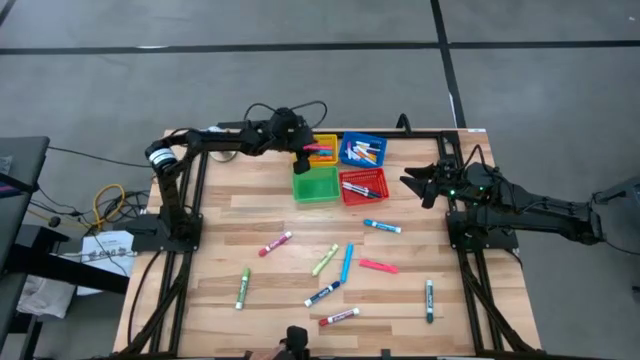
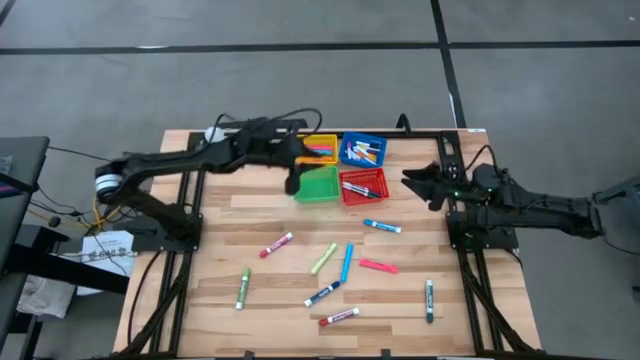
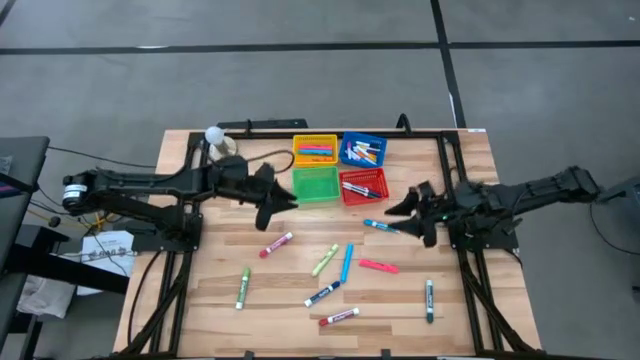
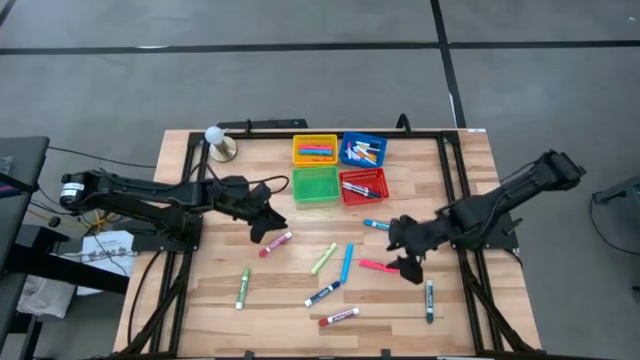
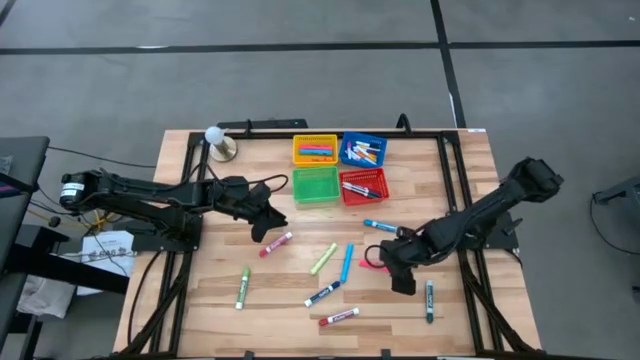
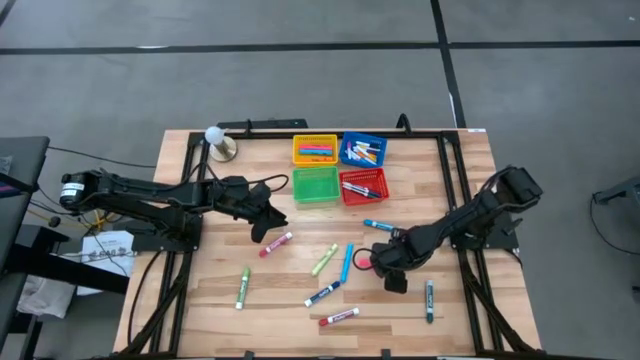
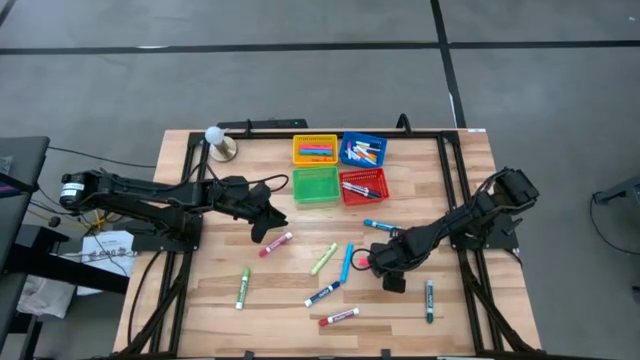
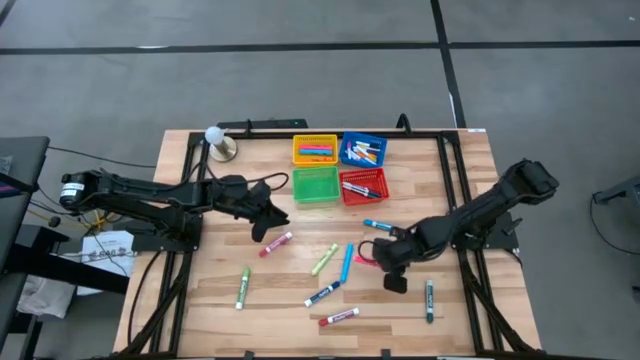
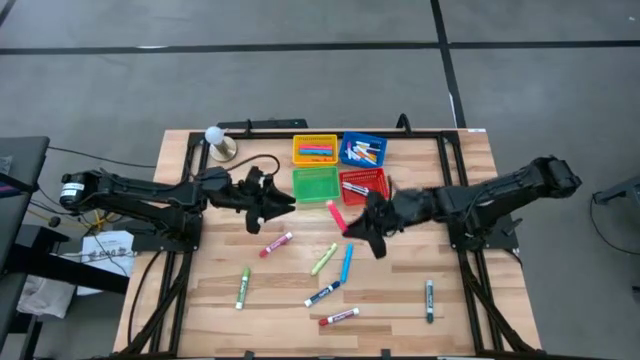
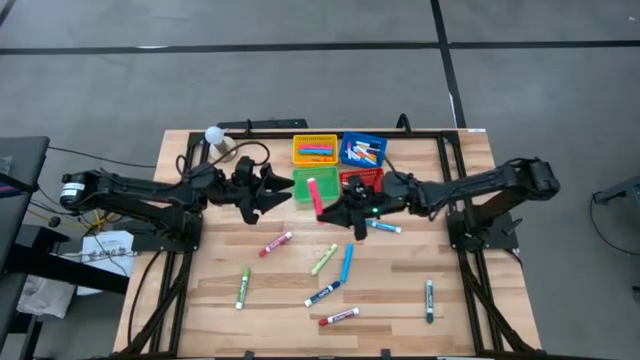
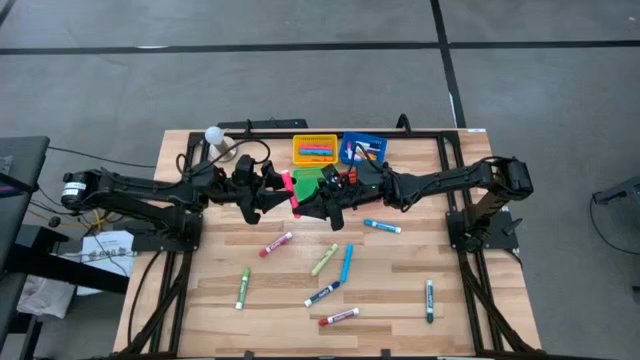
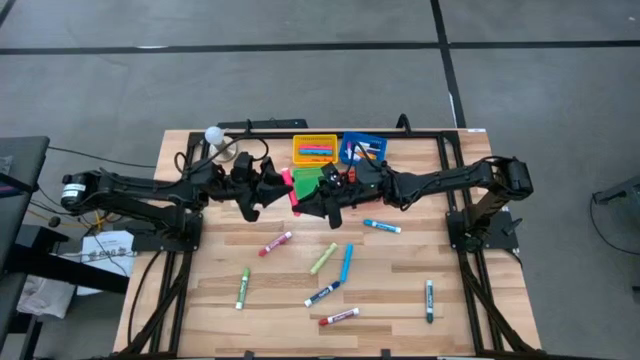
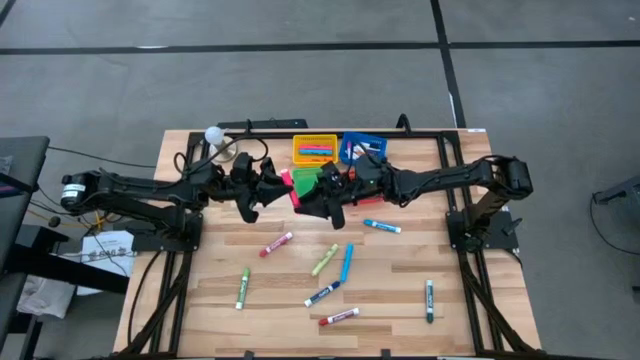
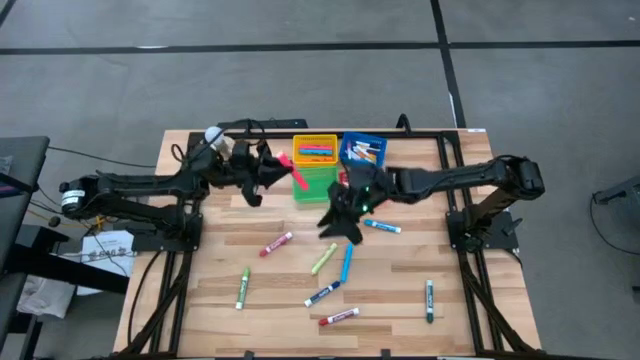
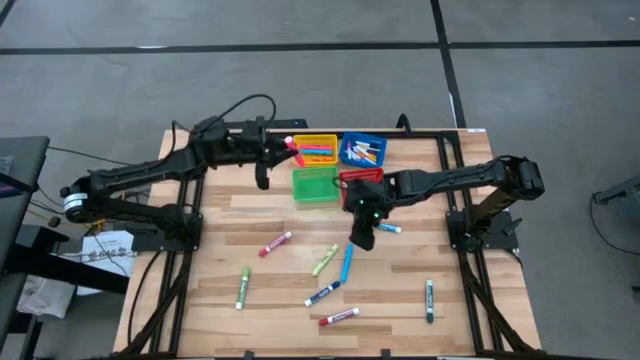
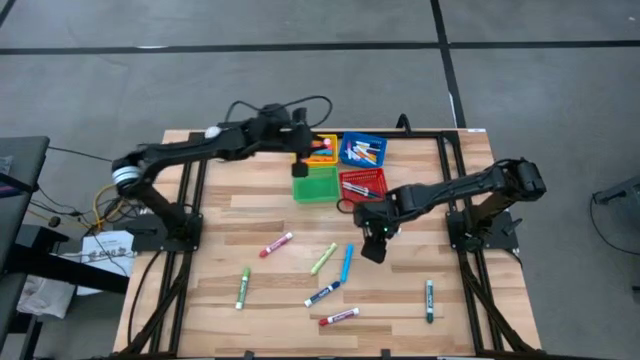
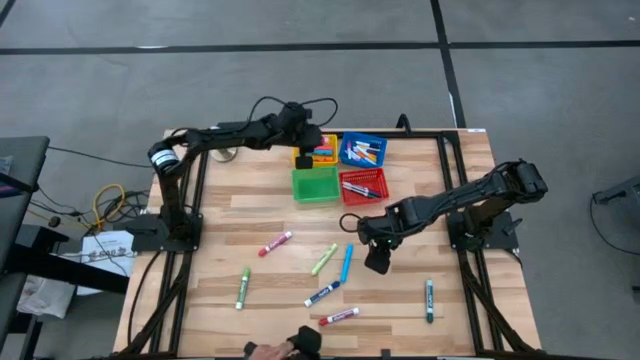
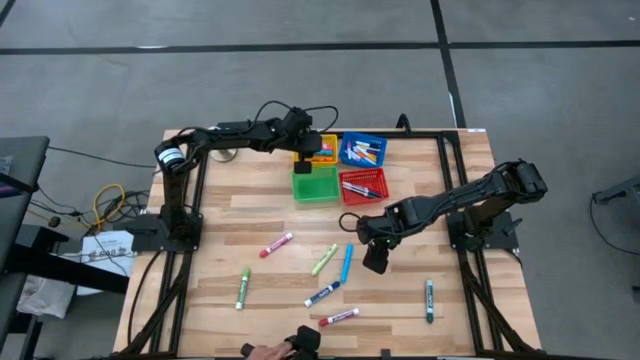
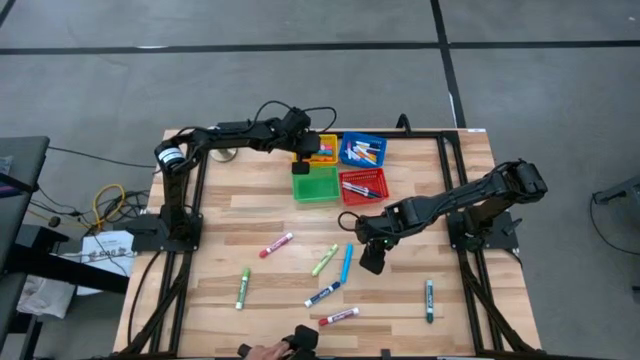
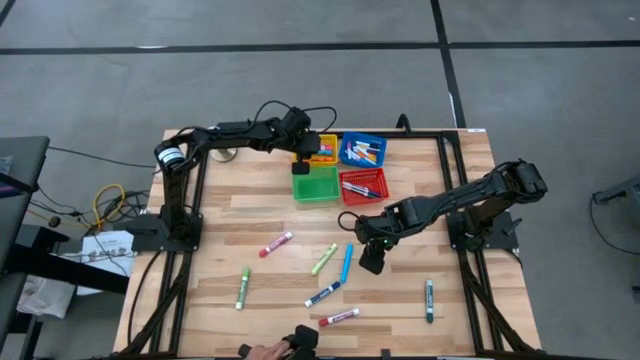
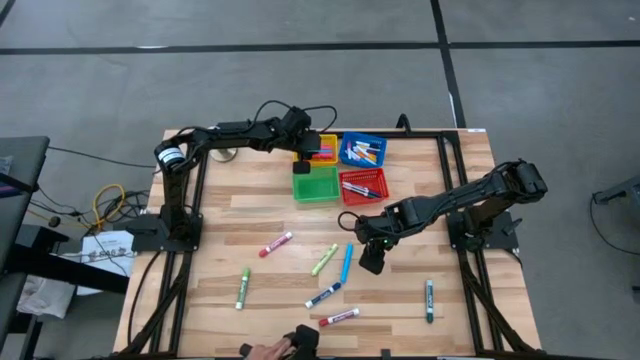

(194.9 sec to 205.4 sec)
Task: Pick & Place Markers
Put the pink highlighter into the yellow bin

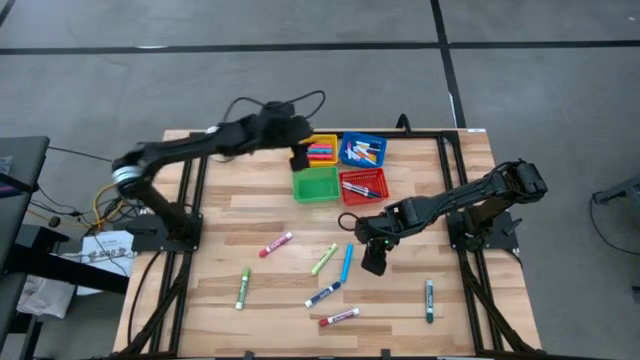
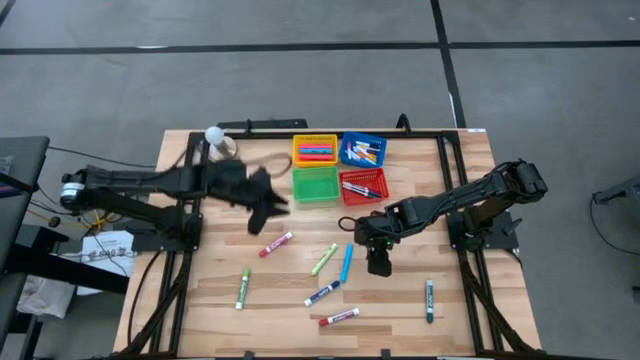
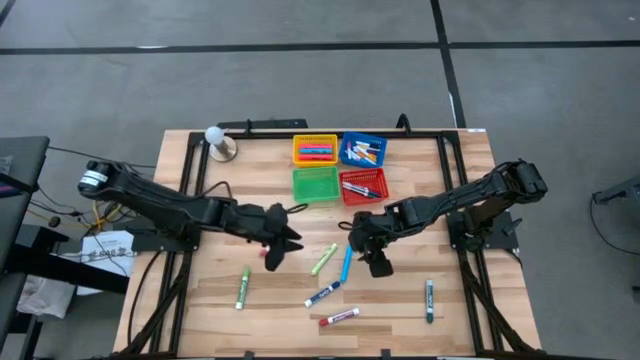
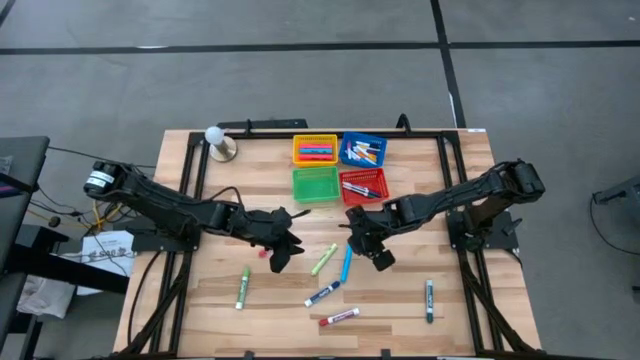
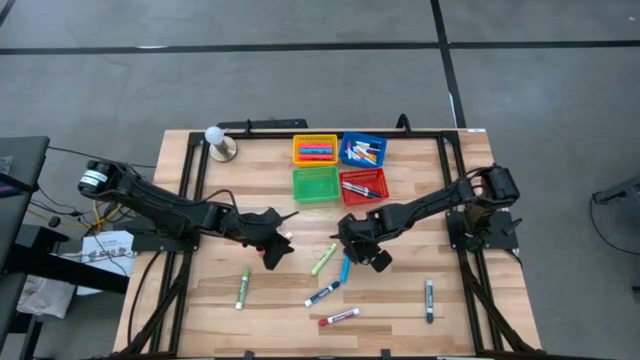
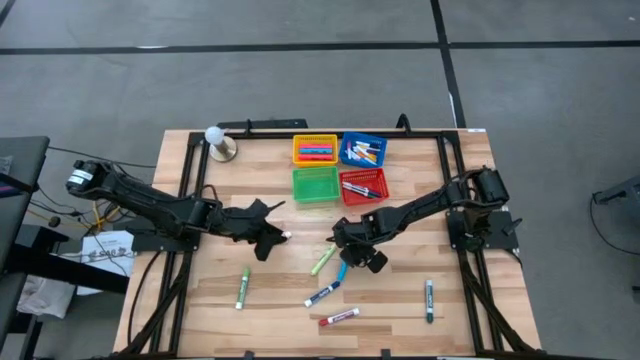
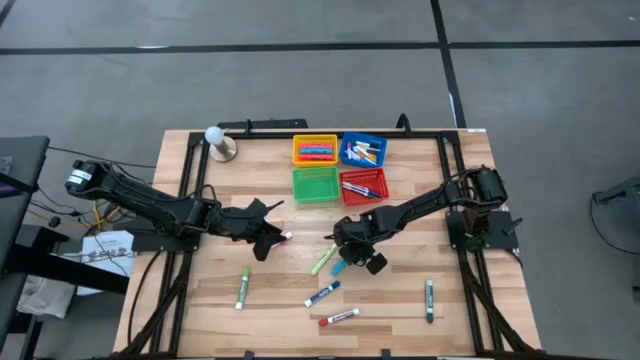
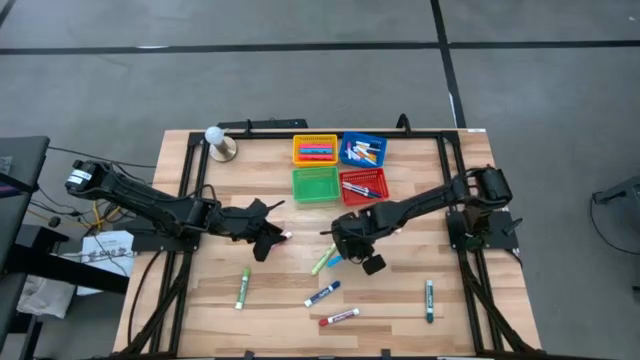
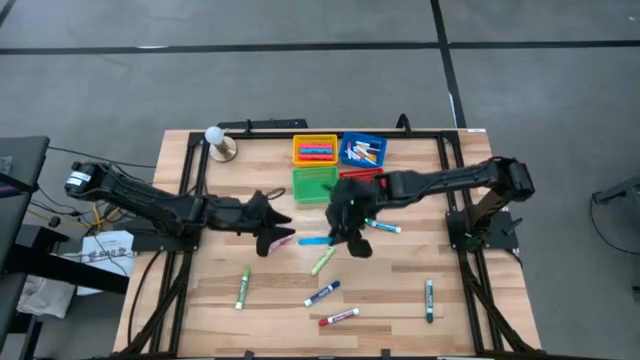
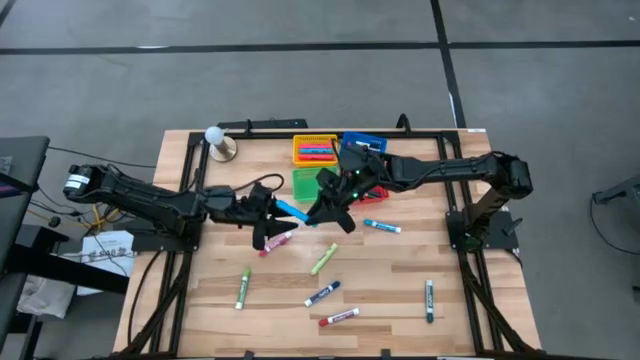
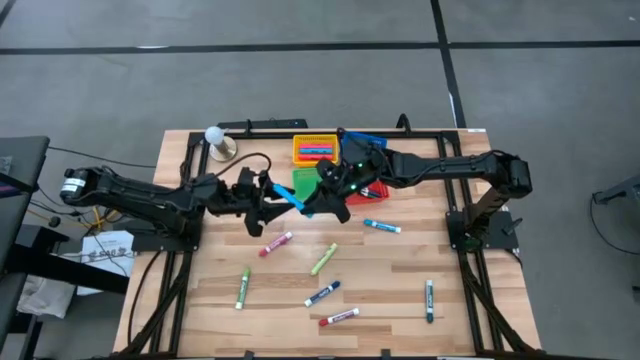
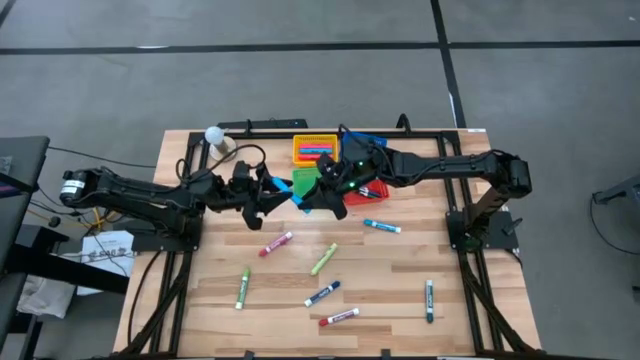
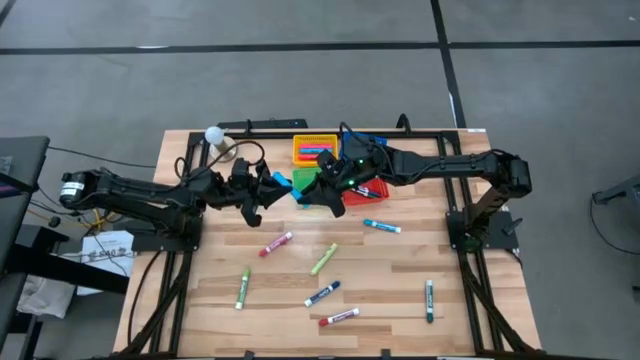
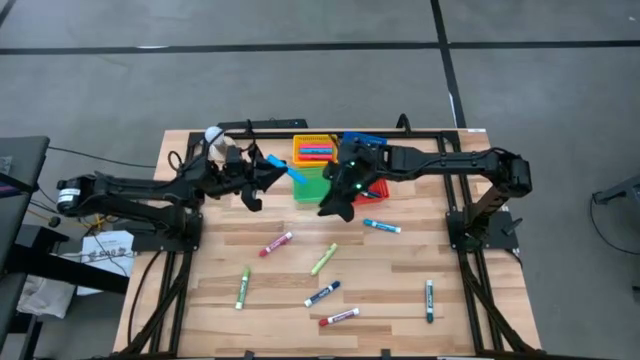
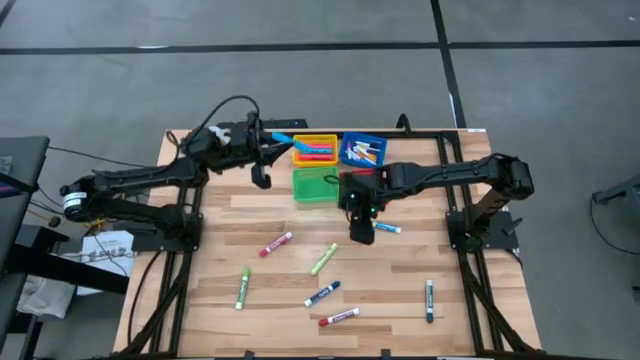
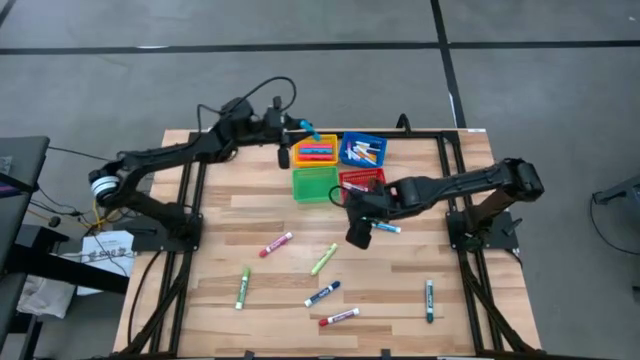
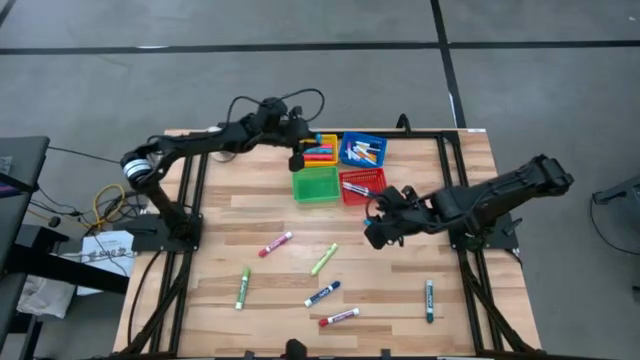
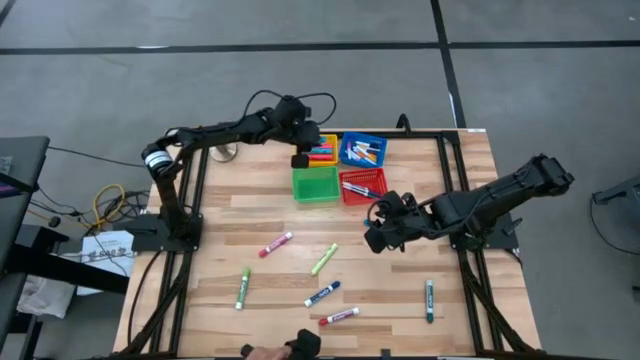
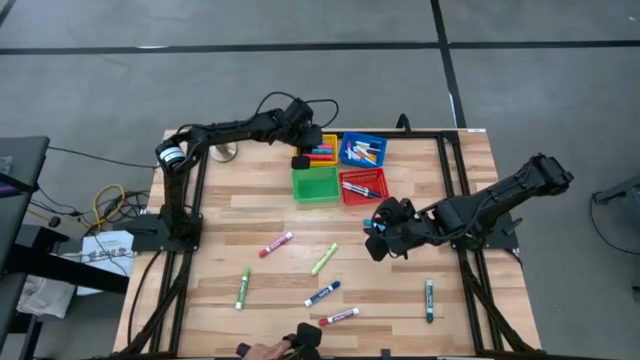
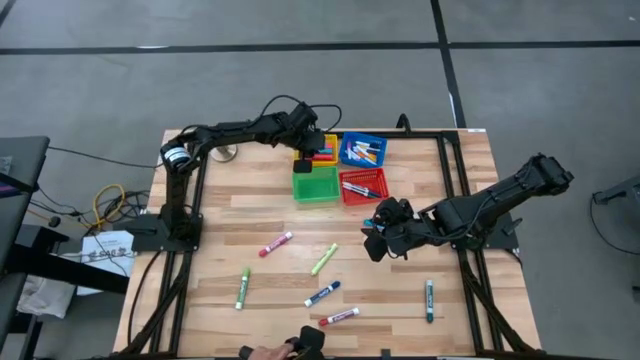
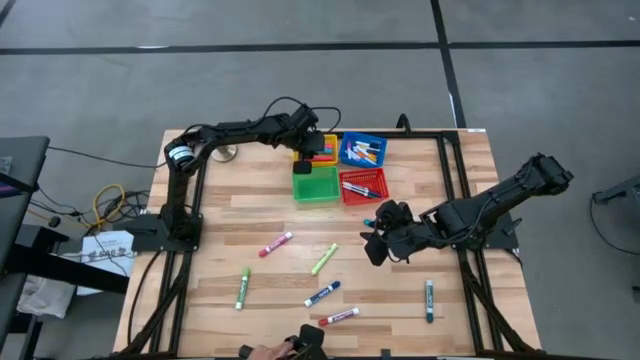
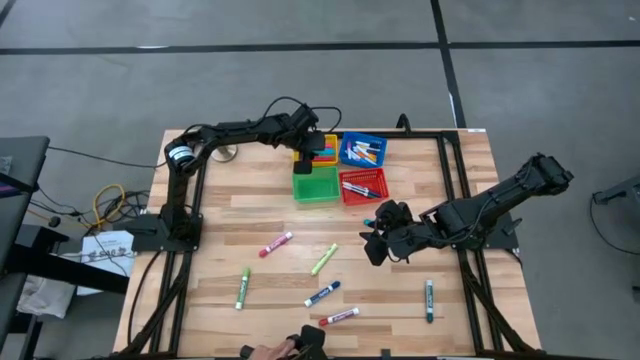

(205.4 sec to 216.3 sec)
Put the light blue highlighter into the yellow bin
